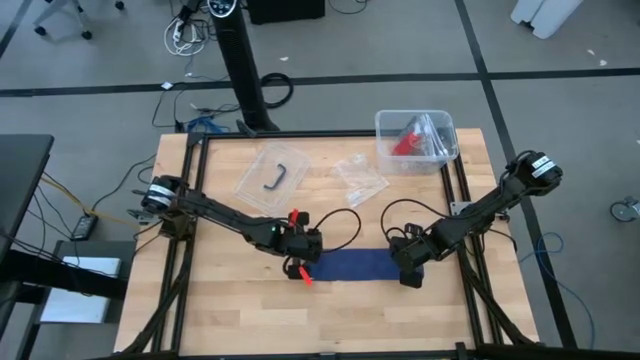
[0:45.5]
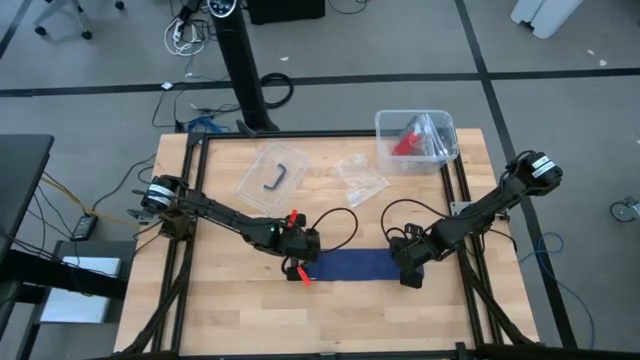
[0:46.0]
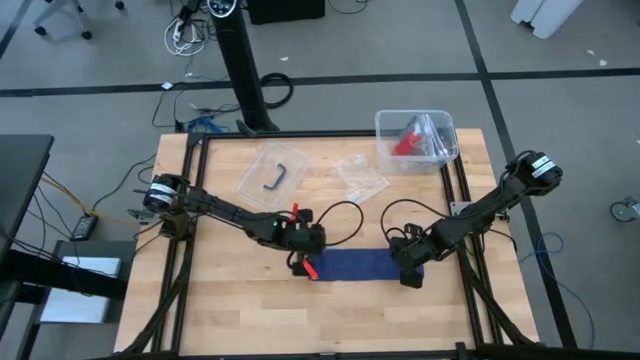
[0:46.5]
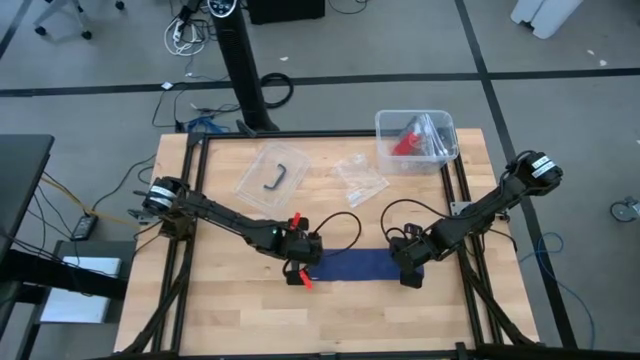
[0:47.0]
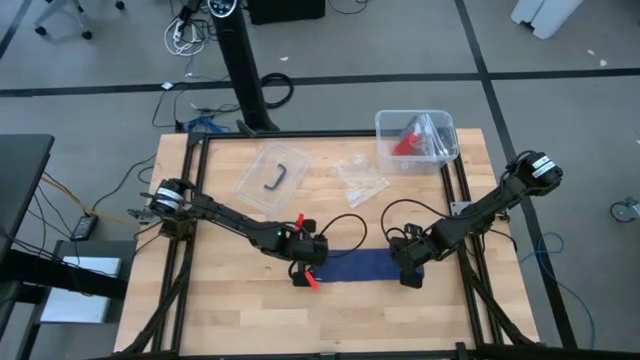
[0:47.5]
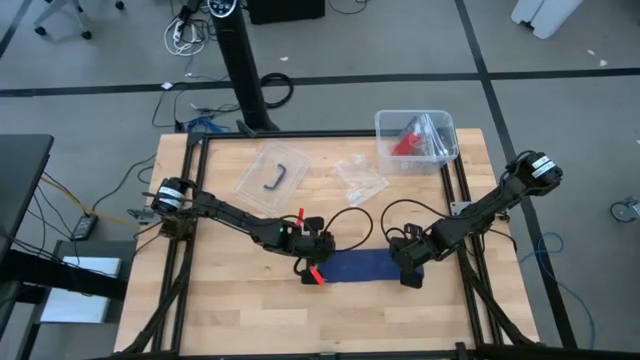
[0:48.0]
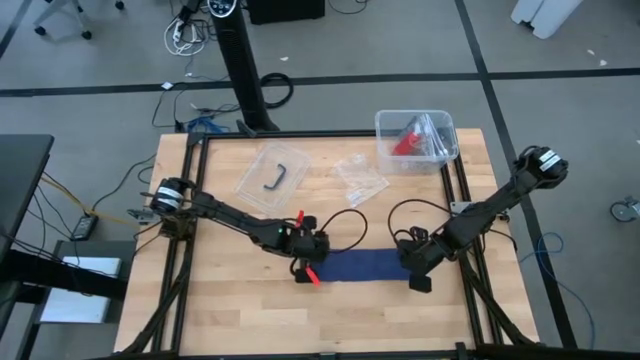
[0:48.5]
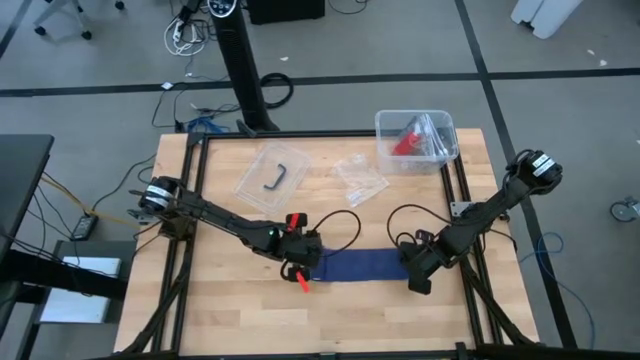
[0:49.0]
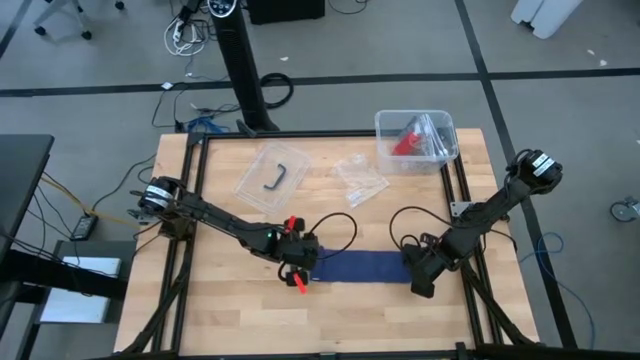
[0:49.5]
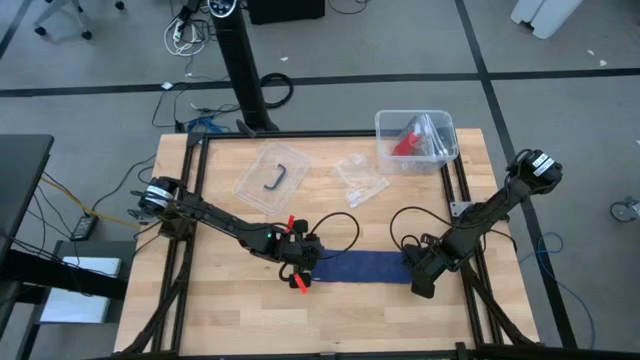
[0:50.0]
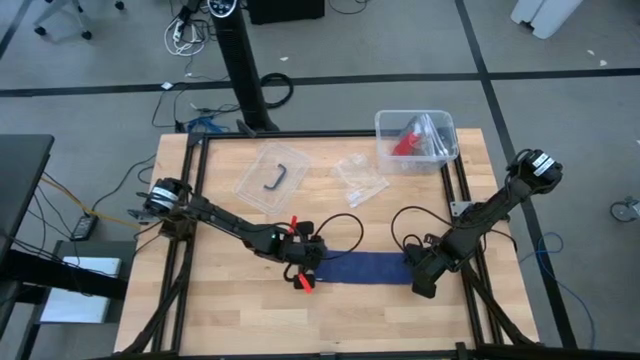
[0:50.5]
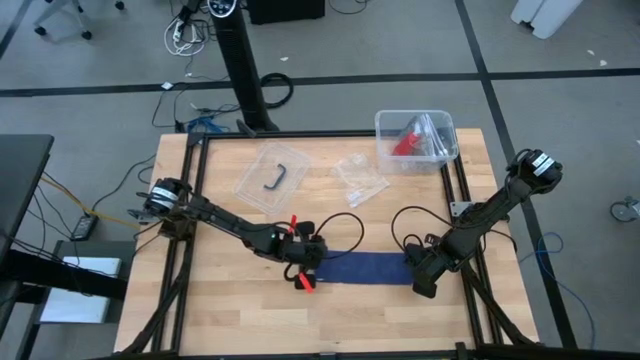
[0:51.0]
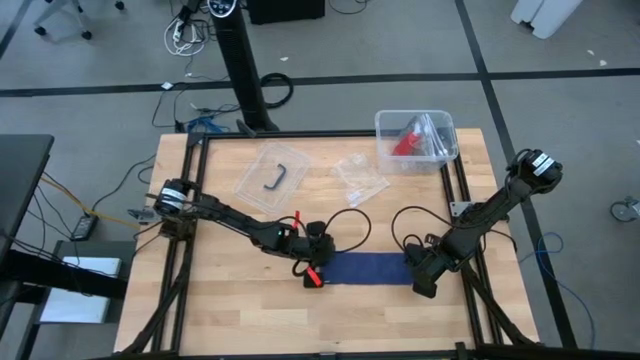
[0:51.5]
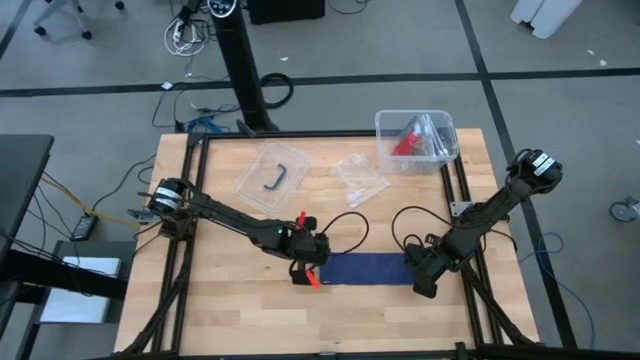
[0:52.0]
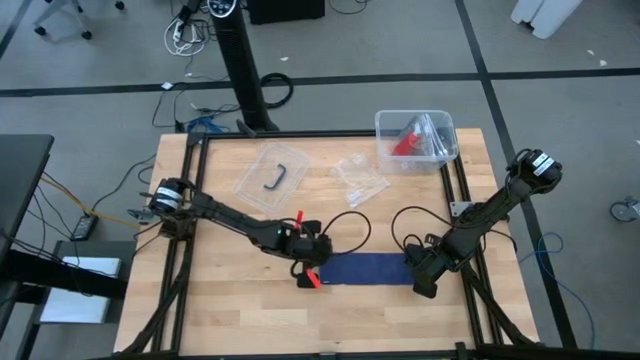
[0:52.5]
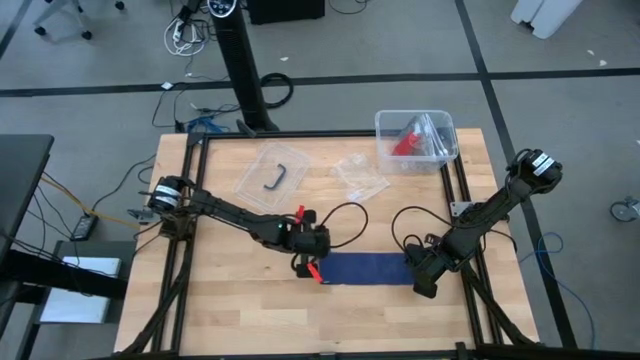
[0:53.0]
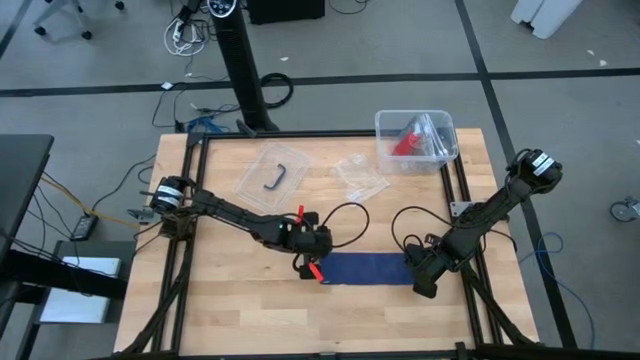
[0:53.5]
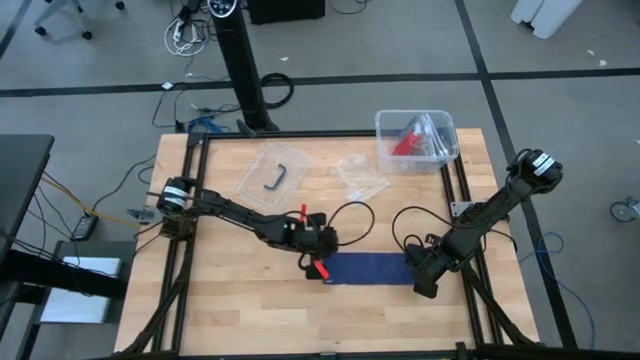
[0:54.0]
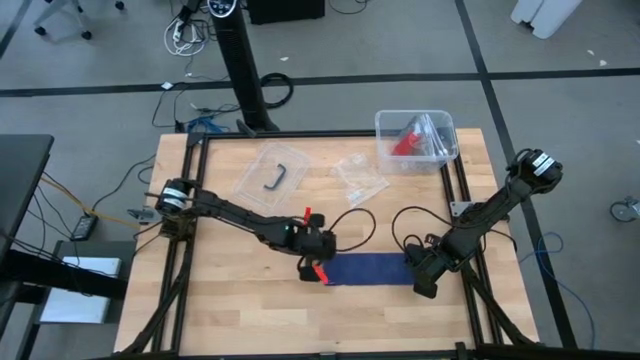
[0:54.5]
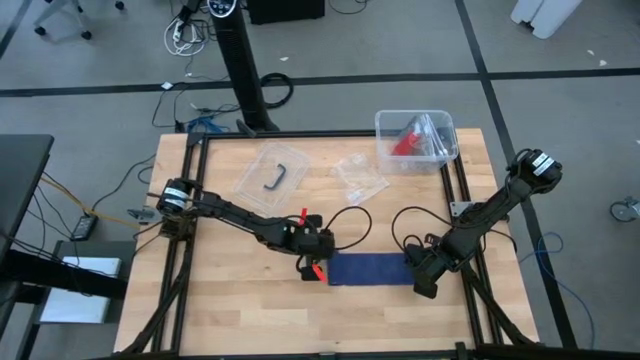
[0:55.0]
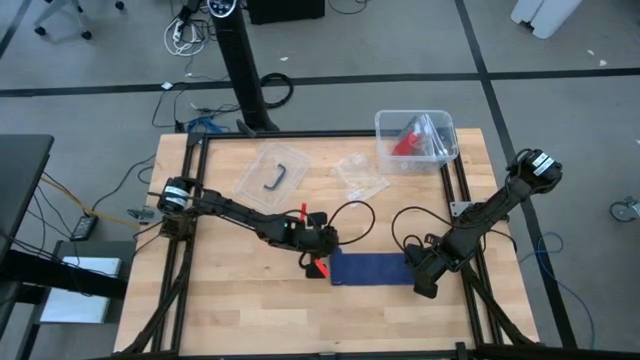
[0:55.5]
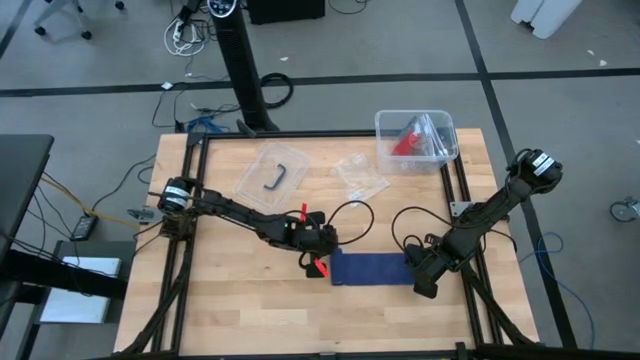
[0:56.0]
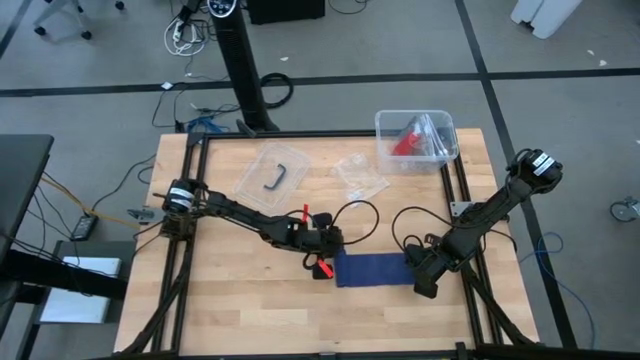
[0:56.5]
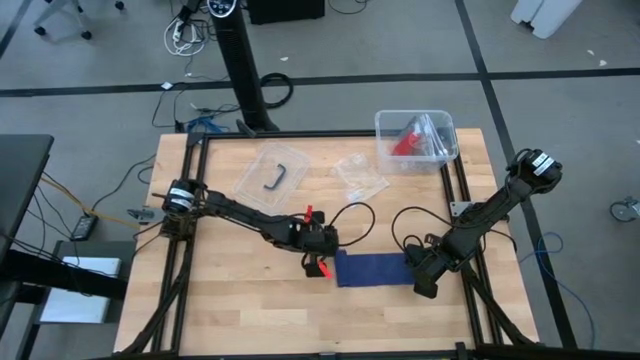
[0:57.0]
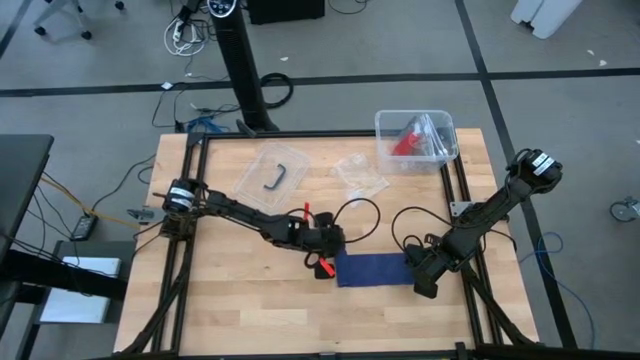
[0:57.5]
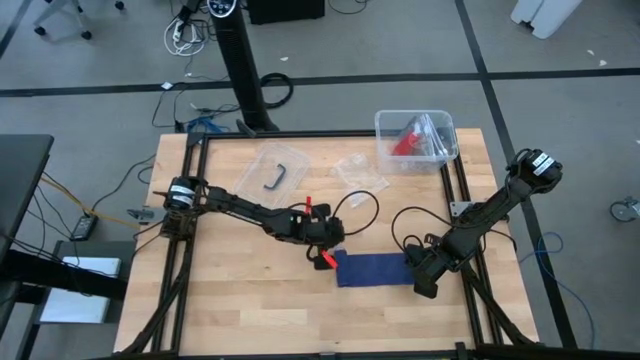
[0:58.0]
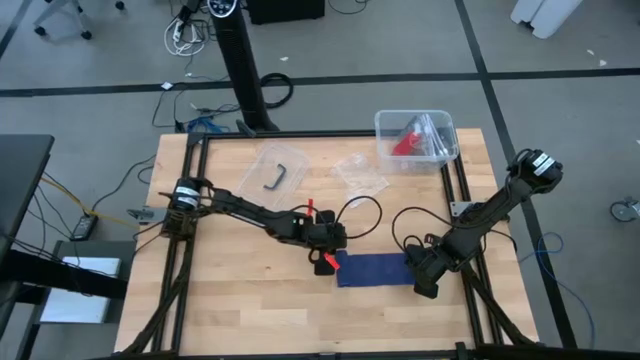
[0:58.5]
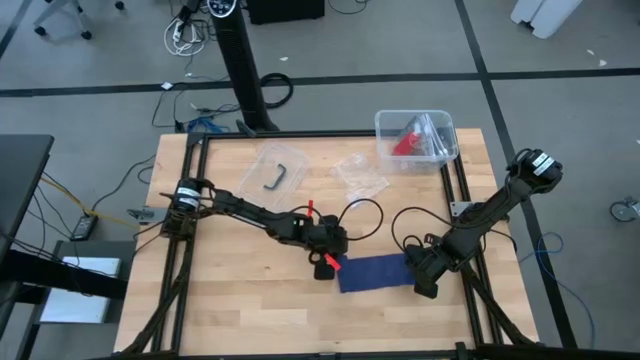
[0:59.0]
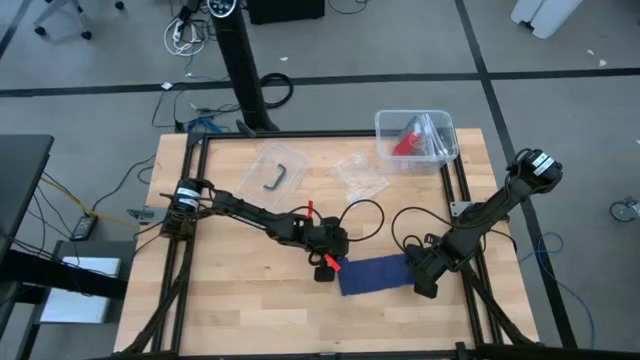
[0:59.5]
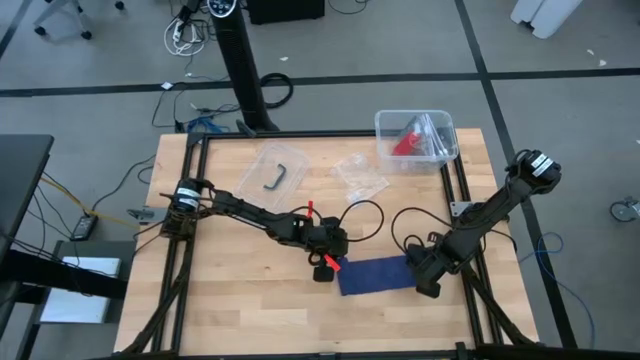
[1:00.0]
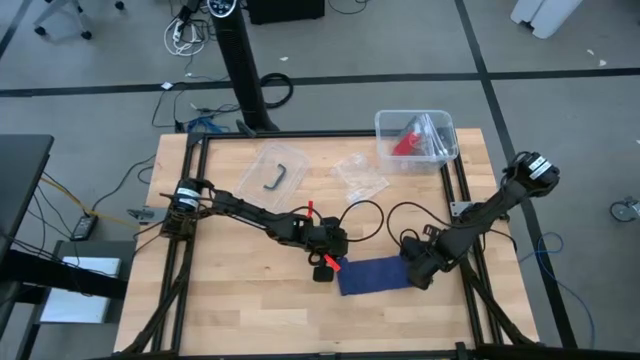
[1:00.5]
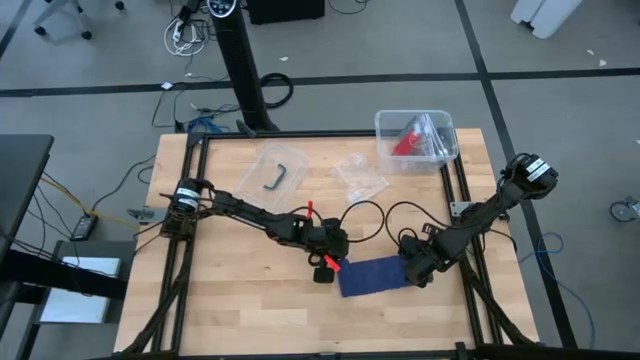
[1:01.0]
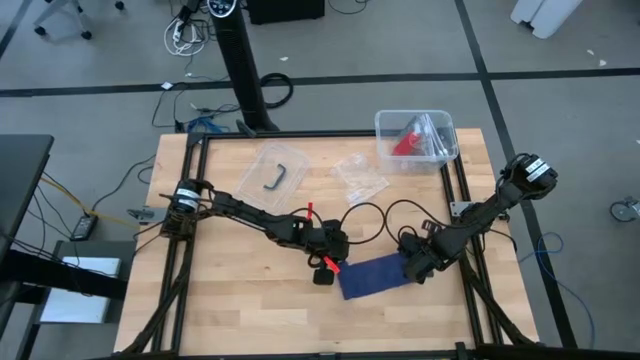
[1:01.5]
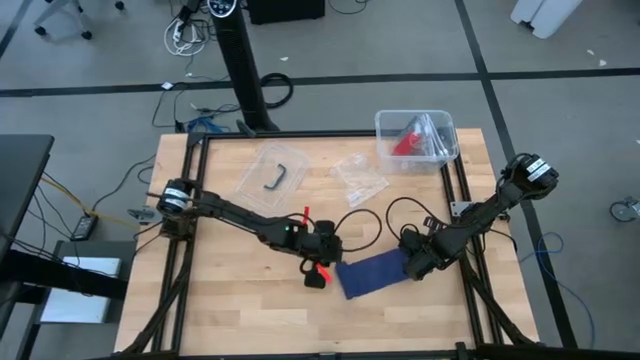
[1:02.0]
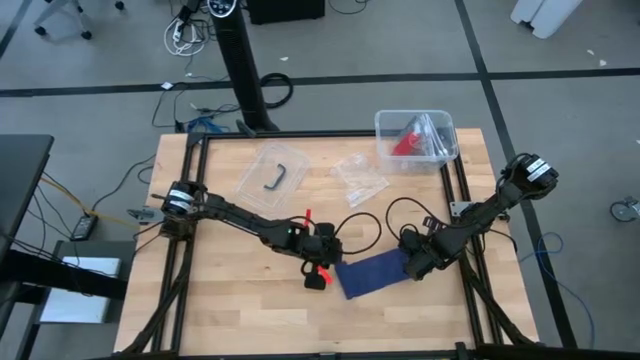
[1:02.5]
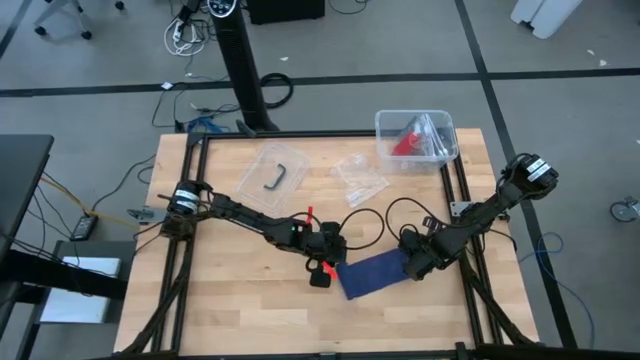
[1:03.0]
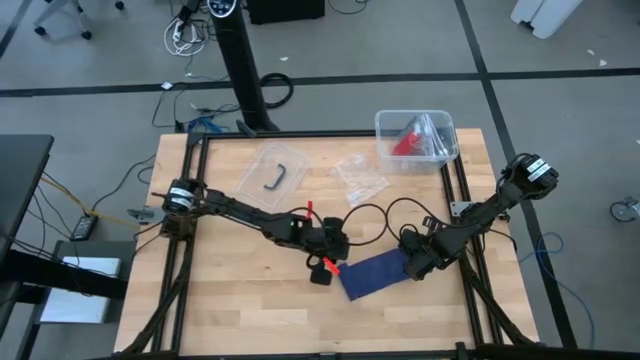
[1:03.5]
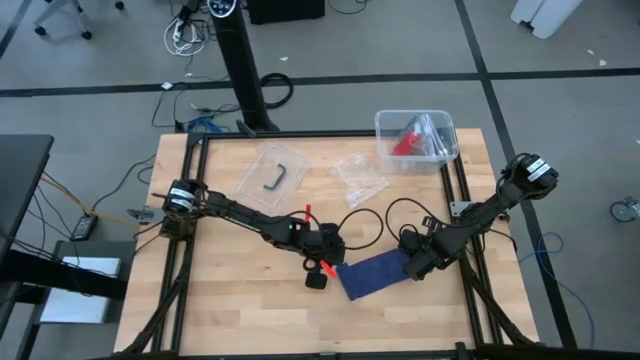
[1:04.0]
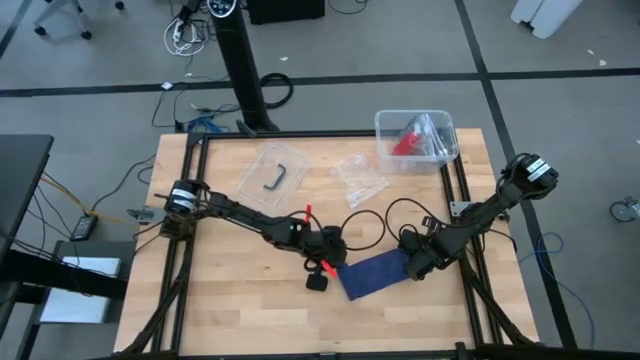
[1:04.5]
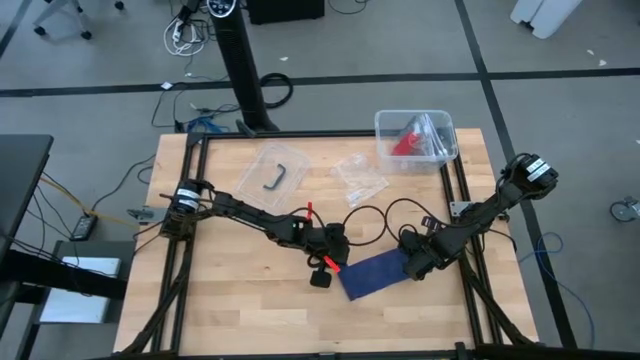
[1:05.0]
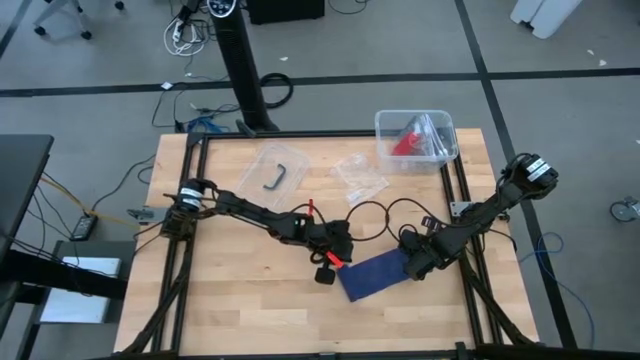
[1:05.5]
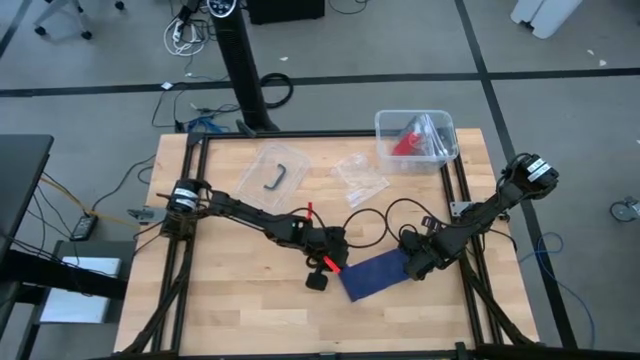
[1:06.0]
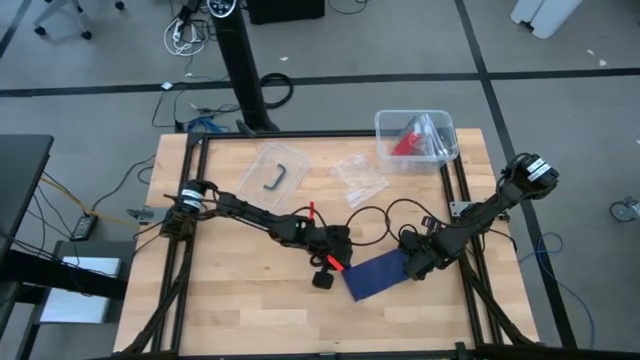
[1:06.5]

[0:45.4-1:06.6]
Task: Roll bandage
Roll the blue bandage
